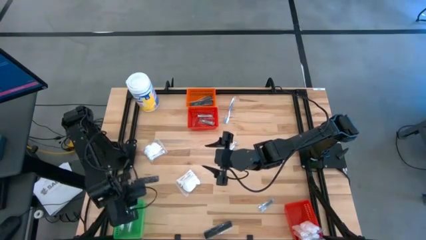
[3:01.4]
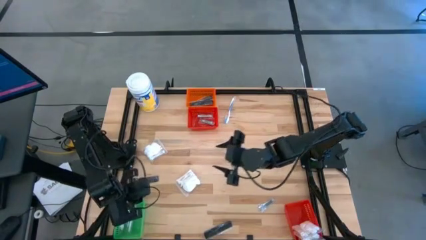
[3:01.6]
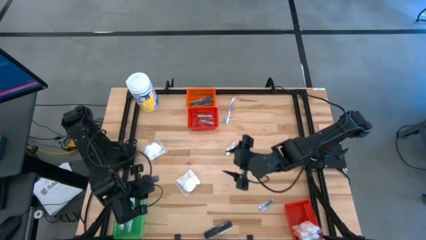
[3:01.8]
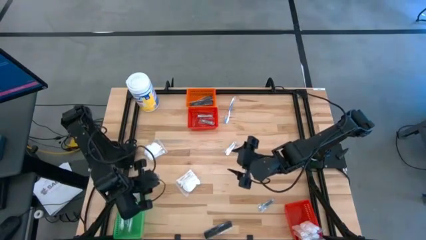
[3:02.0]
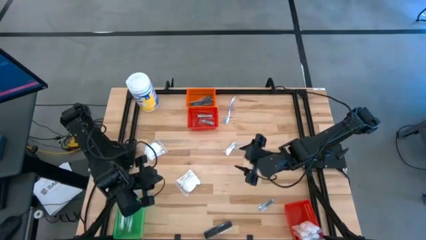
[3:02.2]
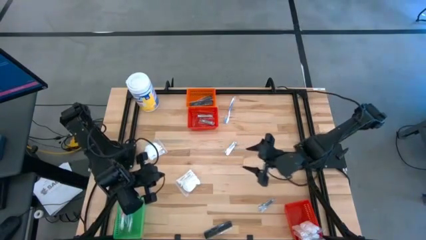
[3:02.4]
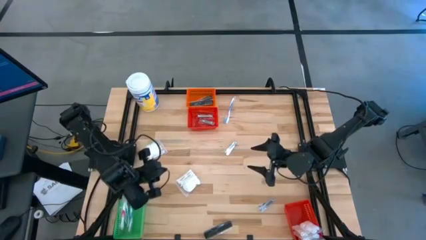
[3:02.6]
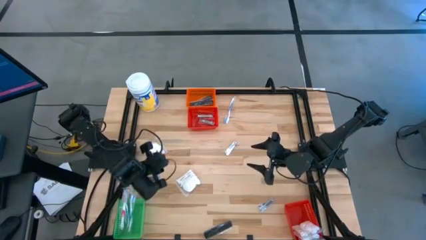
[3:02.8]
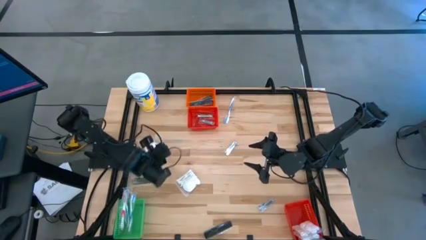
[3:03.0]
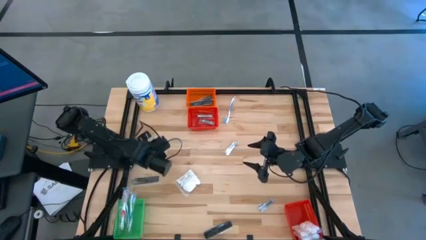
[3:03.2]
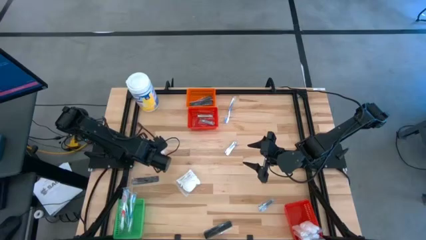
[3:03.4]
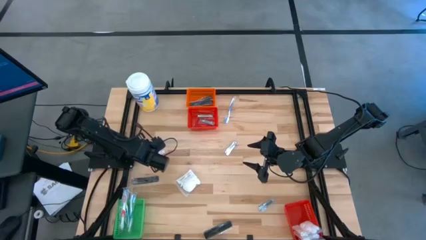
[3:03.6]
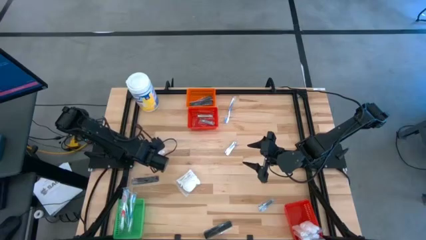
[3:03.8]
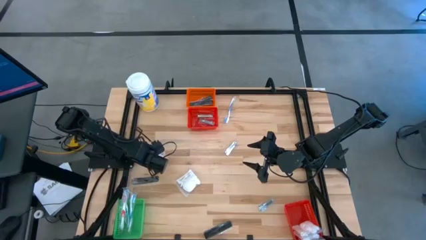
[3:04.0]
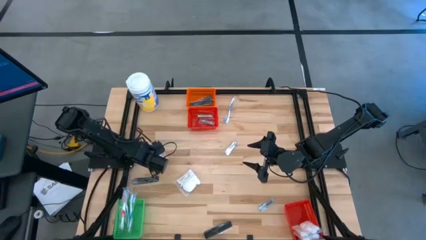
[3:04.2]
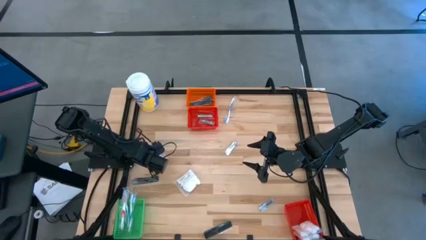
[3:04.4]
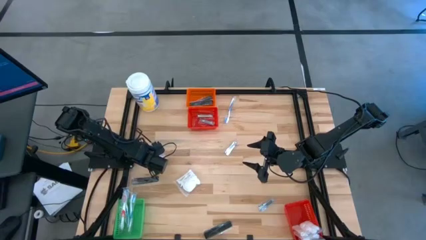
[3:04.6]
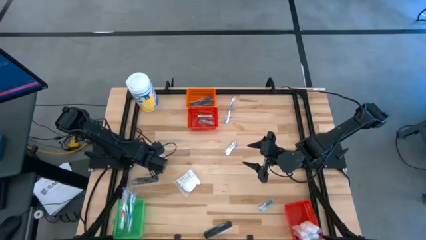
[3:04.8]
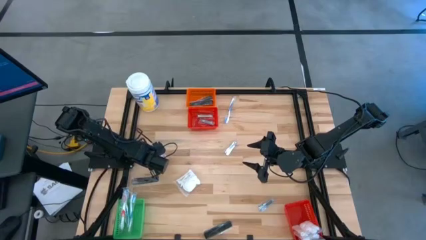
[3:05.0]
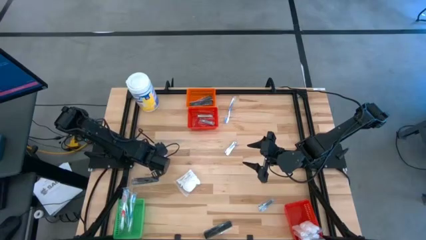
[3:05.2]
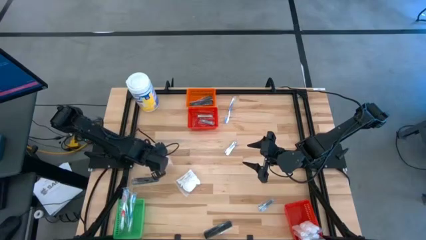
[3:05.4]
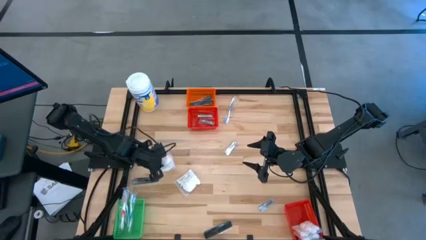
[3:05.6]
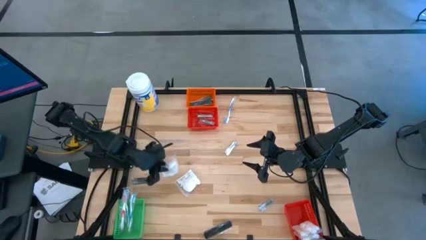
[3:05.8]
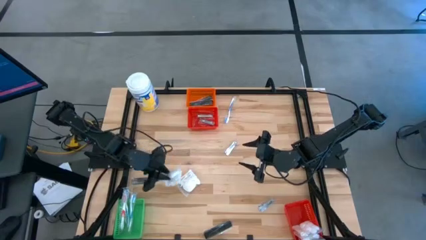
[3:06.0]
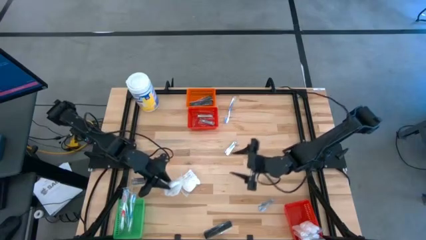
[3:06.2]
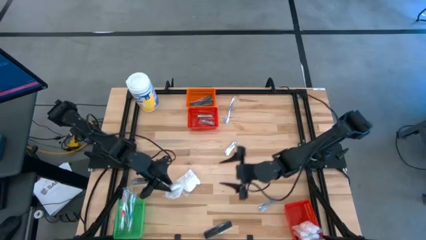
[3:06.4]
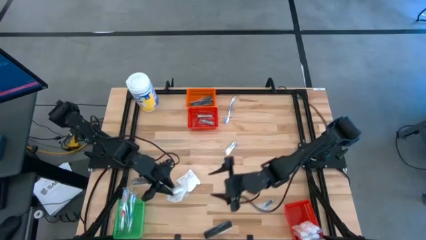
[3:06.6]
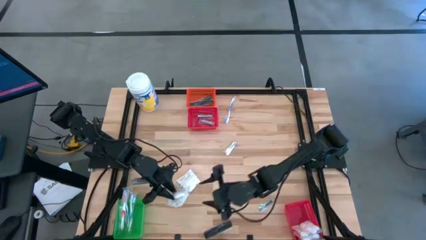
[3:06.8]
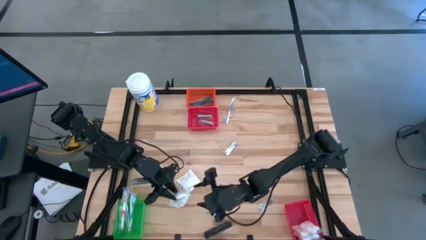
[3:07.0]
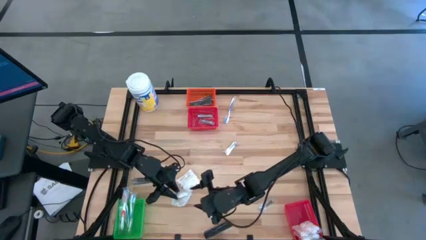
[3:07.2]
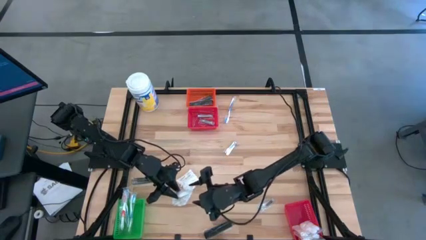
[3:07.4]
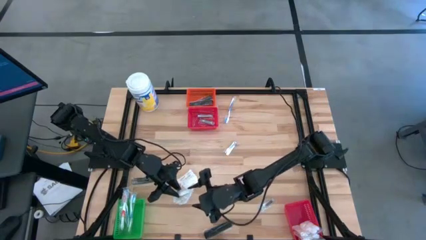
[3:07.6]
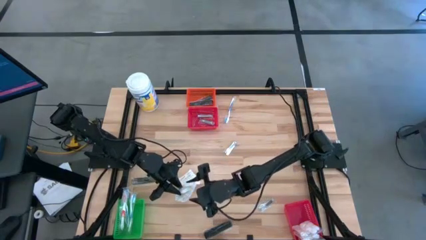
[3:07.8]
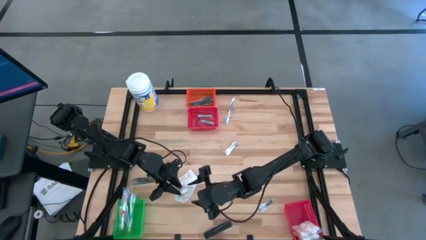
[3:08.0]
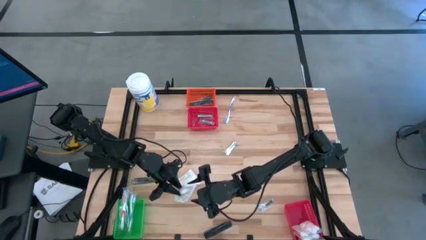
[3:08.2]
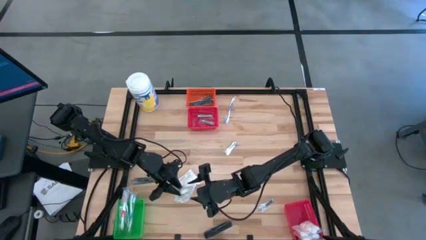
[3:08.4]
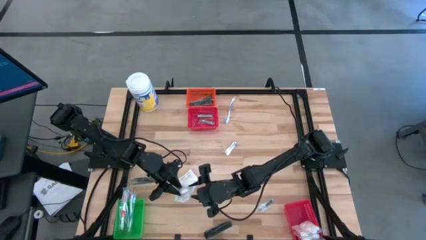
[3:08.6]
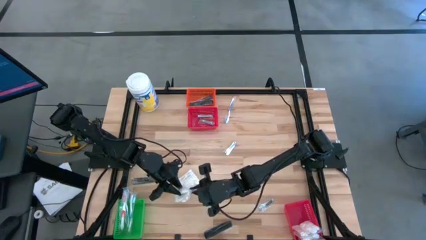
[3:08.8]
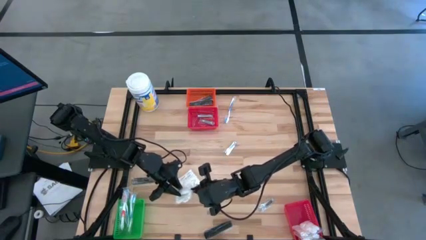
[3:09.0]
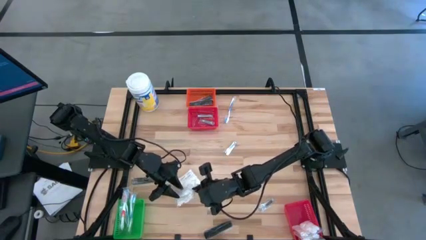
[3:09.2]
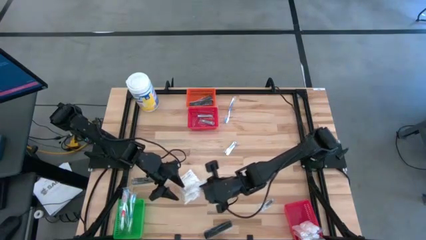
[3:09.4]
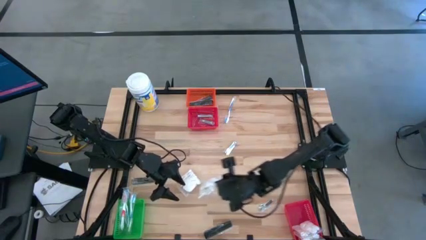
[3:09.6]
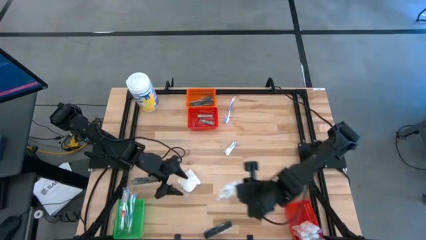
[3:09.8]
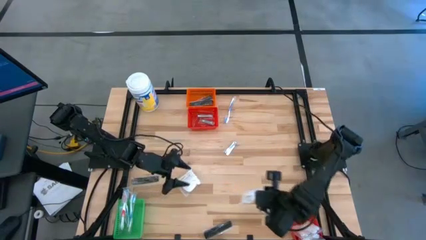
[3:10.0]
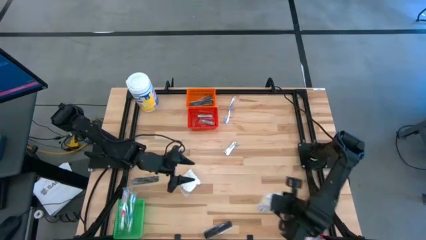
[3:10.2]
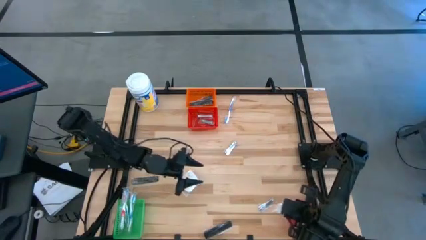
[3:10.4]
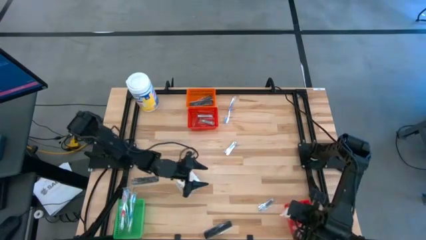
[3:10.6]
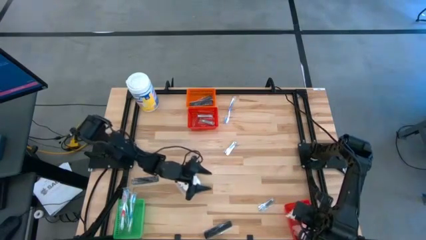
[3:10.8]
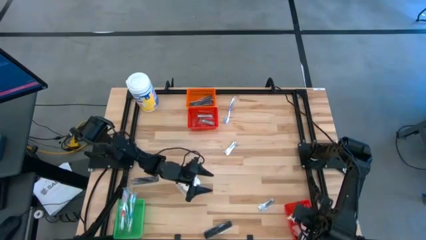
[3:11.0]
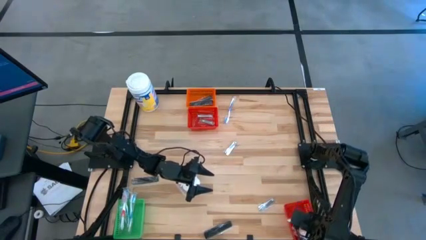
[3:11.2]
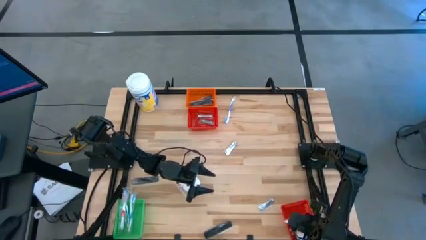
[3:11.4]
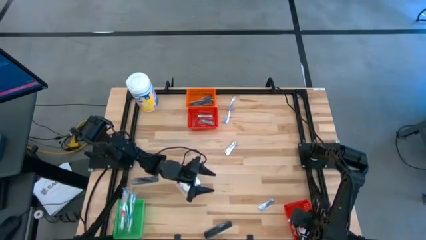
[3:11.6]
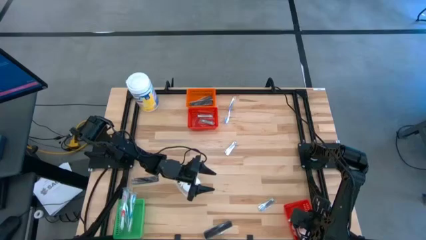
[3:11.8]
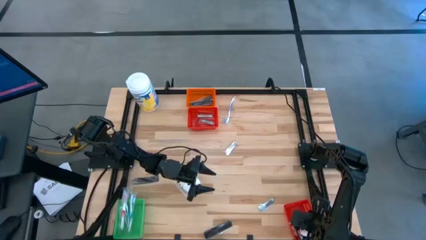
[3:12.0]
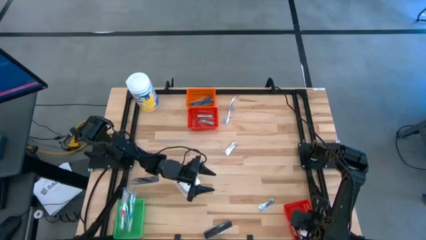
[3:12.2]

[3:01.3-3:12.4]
Task: Pick & Place Travel size toiletries
Put the cotton pack into the bottom red basket

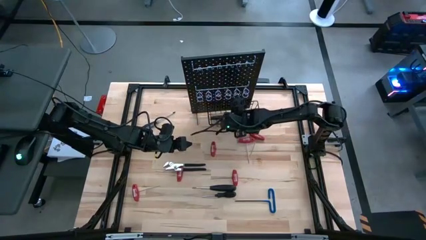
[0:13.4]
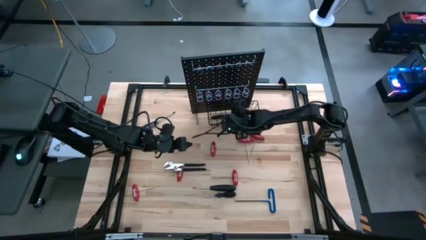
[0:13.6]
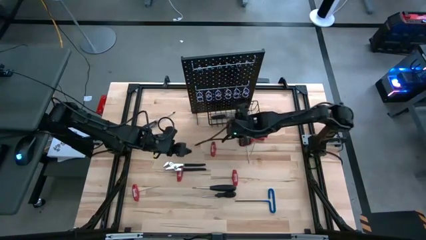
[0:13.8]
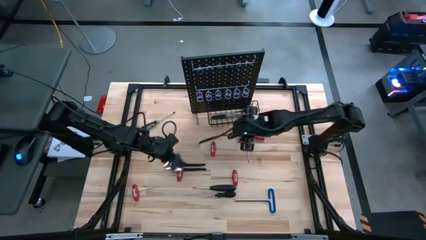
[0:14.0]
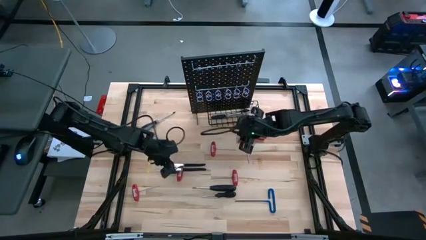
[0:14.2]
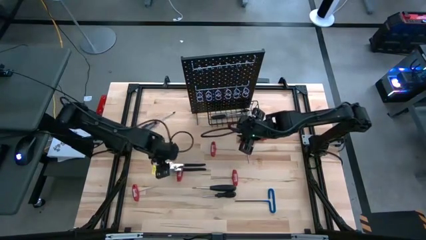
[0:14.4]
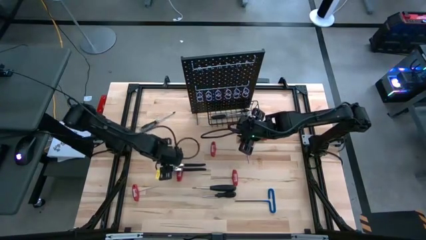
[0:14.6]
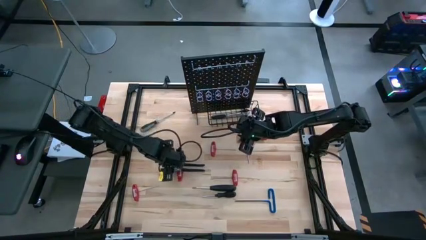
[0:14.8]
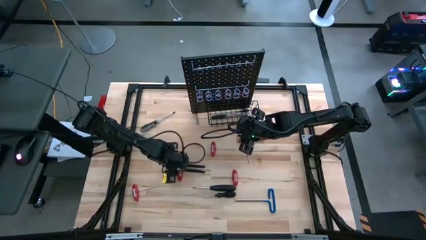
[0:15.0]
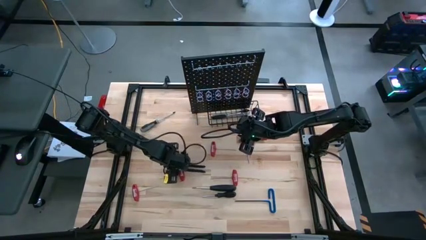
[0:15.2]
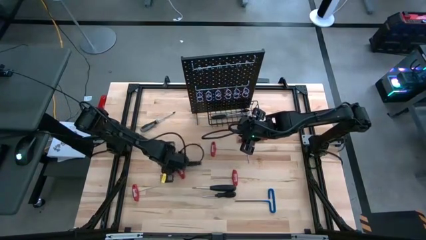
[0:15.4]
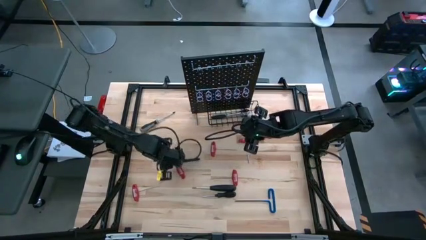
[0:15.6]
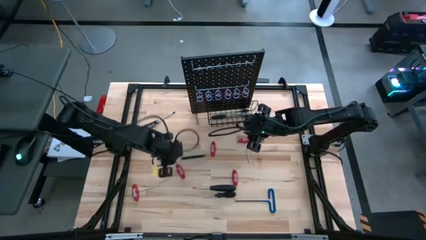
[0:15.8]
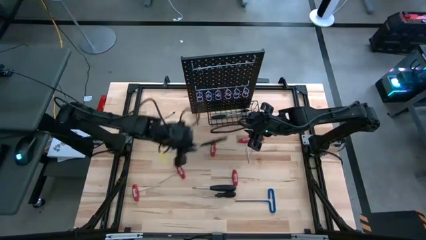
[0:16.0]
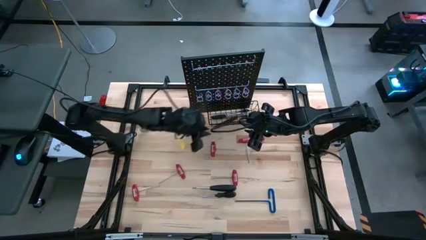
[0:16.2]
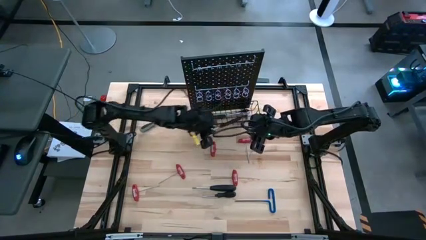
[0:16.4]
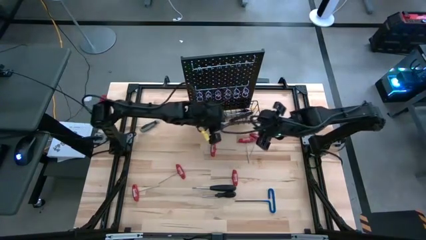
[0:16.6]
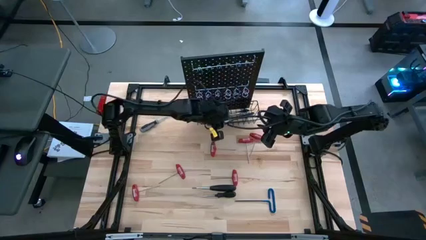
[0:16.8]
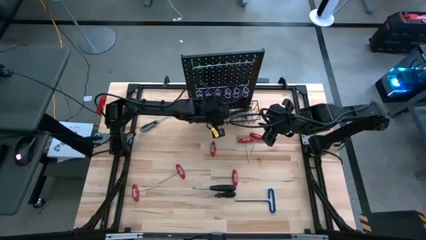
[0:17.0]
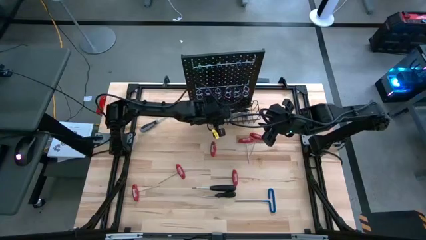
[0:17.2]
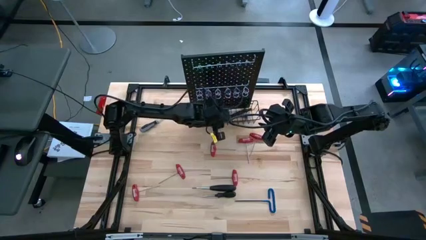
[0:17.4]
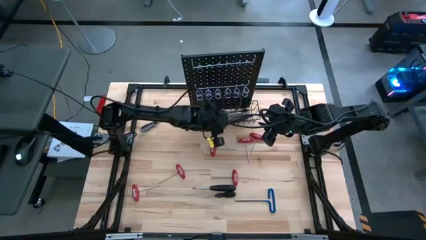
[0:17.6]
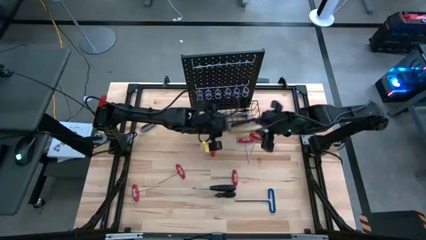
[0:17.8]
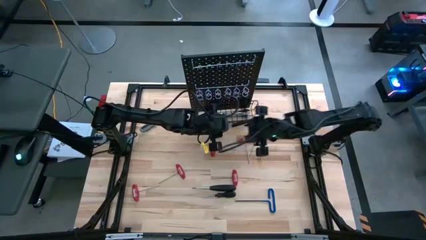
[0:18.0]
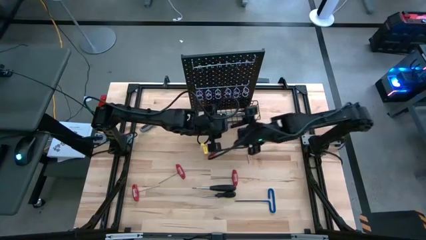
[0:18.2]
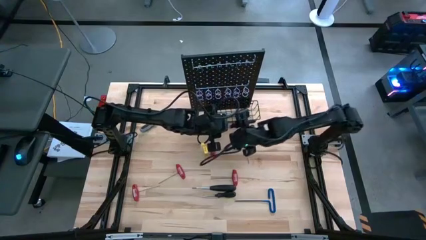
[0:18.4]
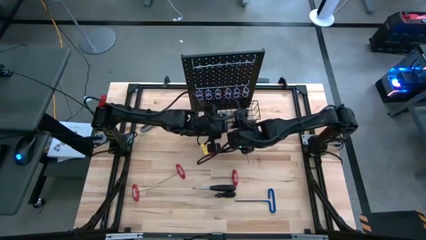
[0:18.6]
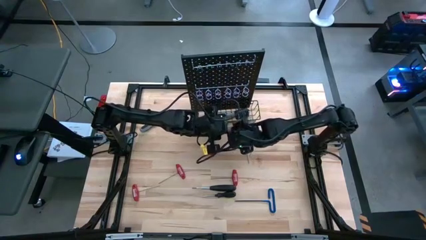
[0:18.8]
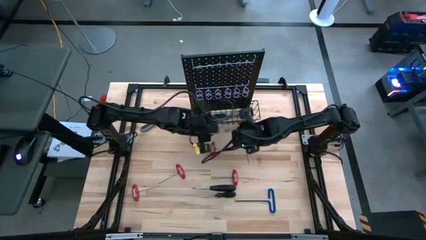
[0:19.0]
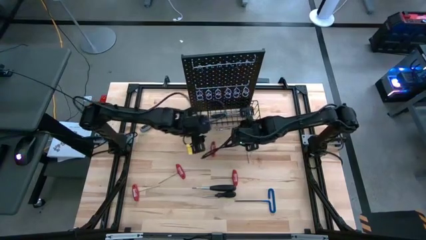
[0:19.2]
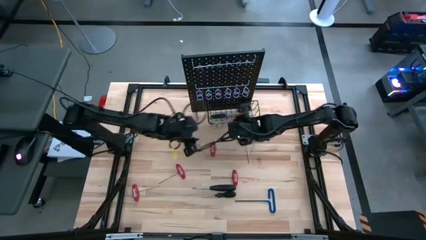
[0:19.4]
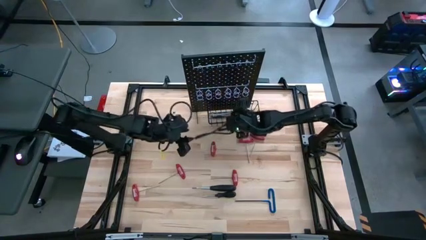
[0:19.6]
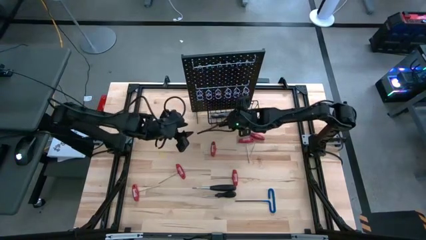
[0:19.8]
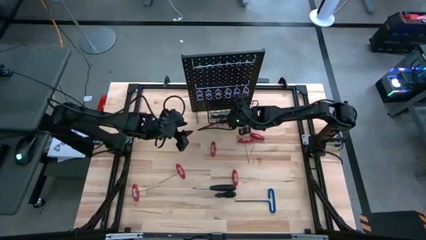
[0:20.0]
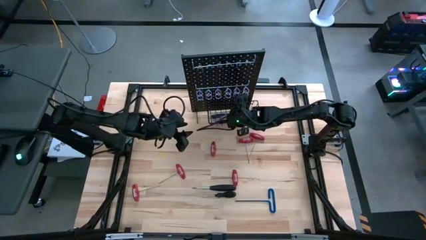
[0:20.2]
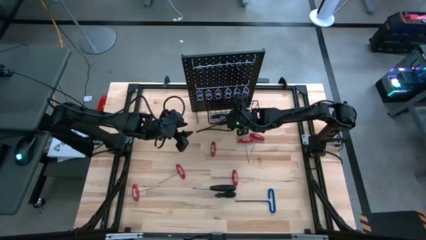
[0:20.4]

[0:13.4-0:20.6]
Task: Hang tools onto peg board
Put the black slip-joint plier into the wire basket on the pegboard
